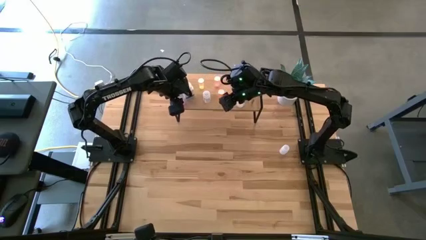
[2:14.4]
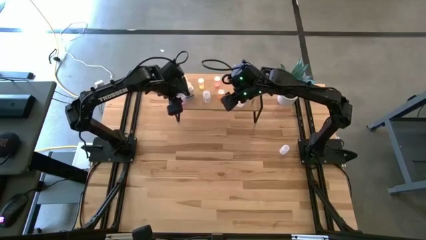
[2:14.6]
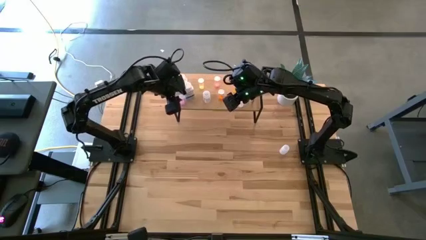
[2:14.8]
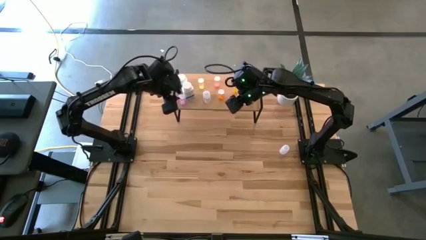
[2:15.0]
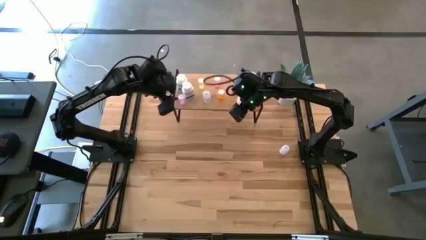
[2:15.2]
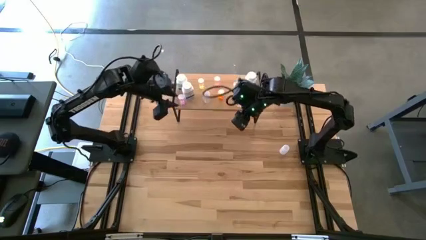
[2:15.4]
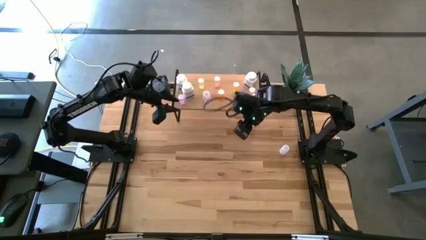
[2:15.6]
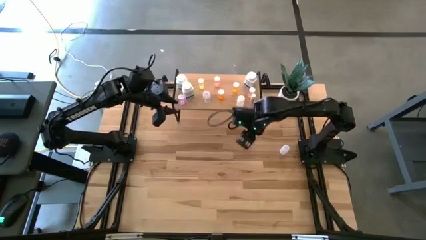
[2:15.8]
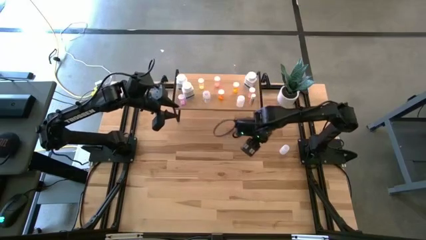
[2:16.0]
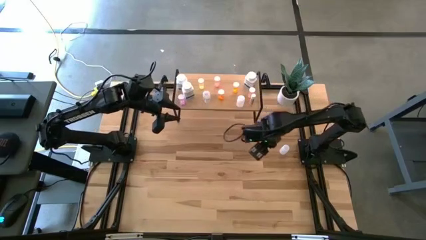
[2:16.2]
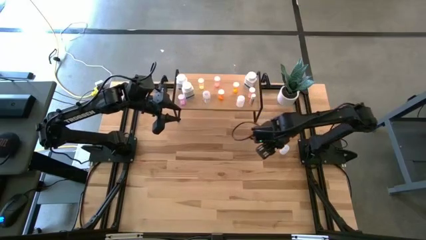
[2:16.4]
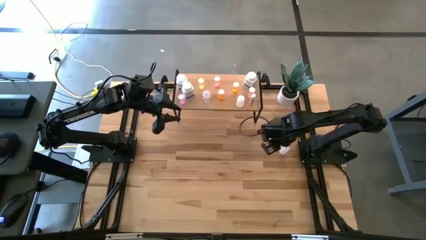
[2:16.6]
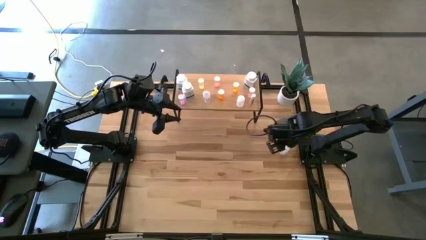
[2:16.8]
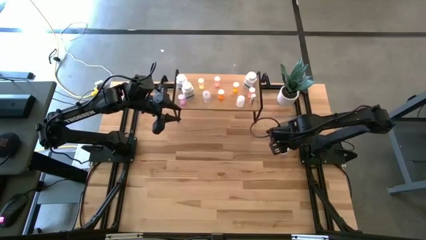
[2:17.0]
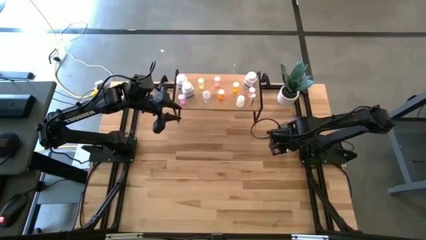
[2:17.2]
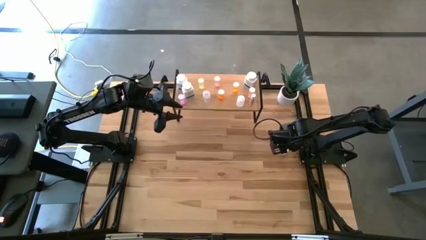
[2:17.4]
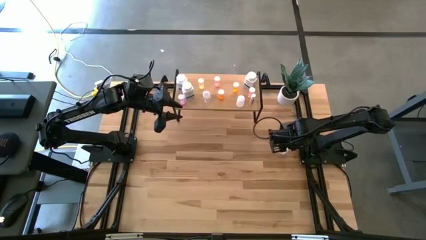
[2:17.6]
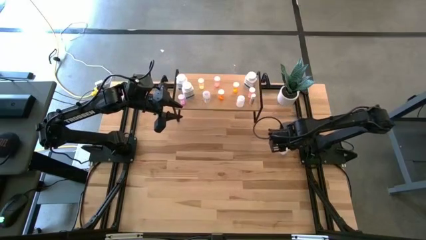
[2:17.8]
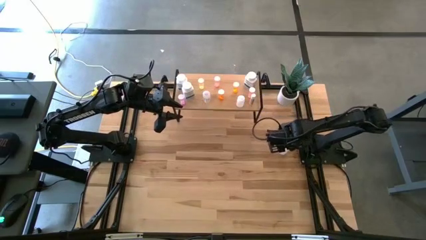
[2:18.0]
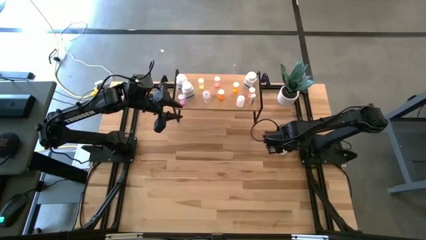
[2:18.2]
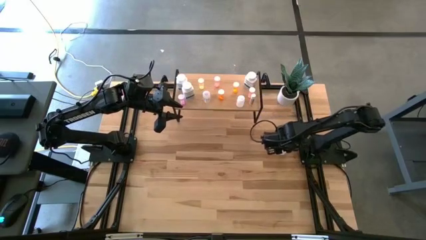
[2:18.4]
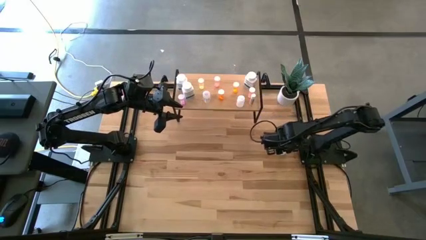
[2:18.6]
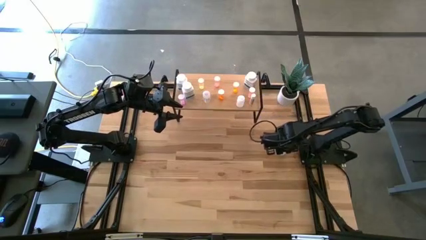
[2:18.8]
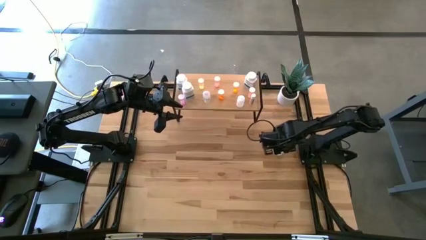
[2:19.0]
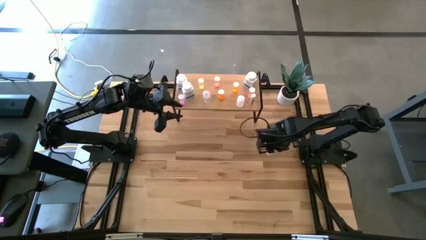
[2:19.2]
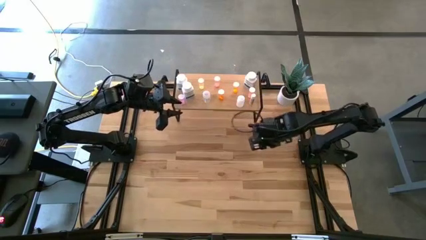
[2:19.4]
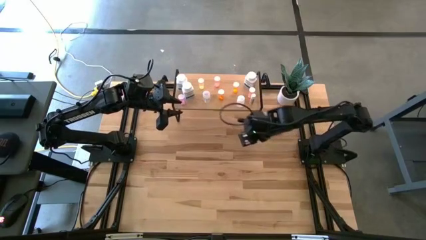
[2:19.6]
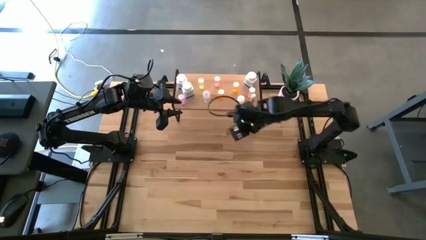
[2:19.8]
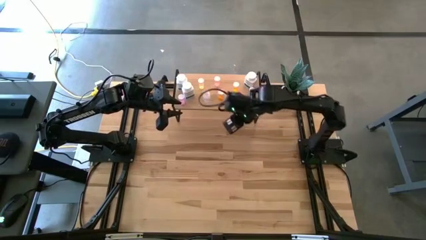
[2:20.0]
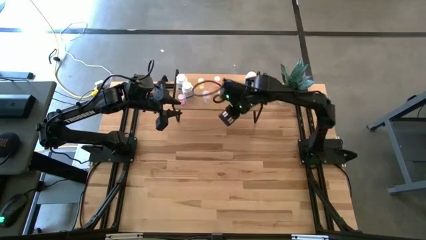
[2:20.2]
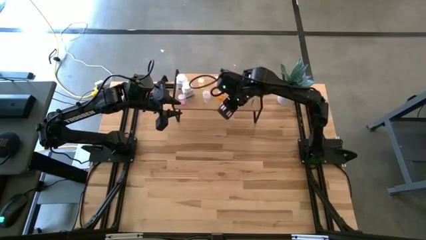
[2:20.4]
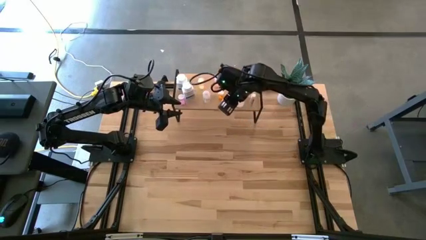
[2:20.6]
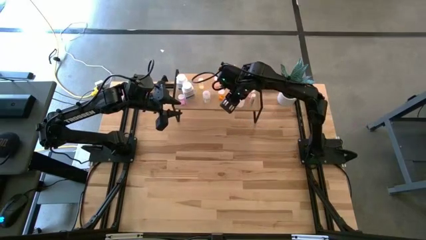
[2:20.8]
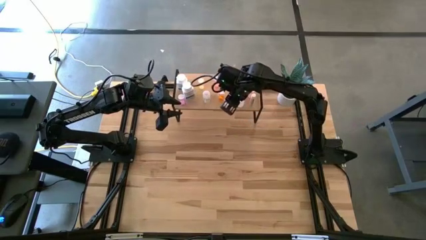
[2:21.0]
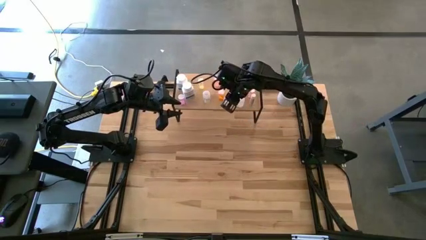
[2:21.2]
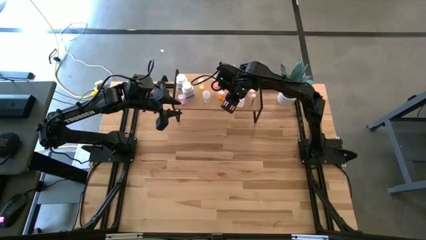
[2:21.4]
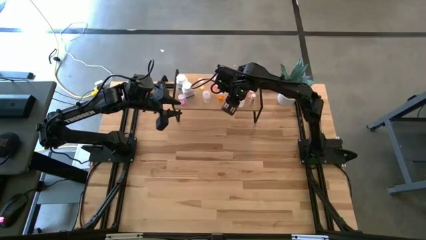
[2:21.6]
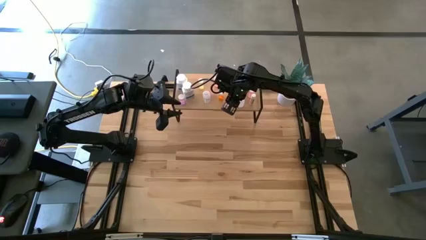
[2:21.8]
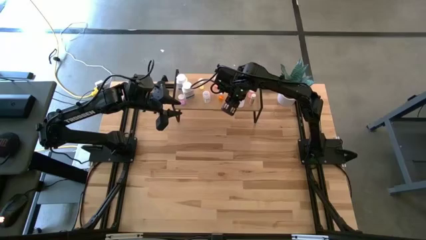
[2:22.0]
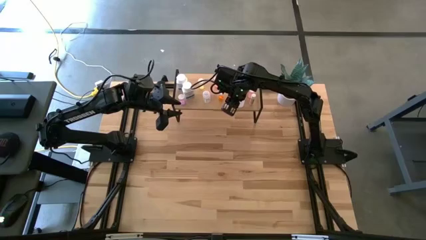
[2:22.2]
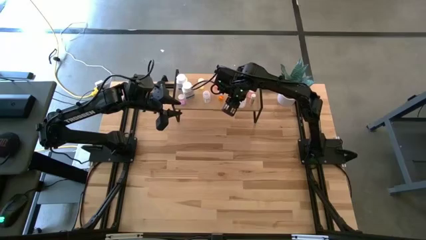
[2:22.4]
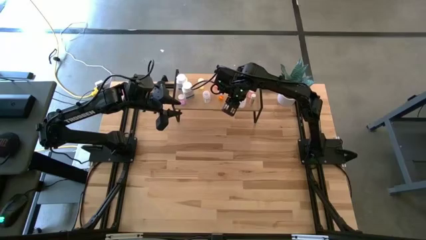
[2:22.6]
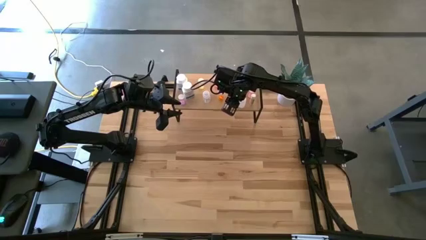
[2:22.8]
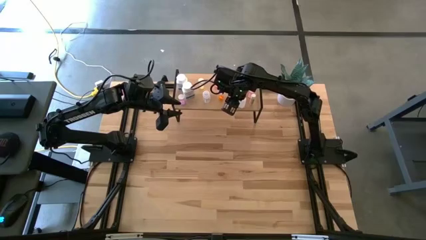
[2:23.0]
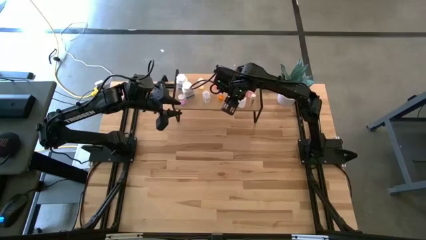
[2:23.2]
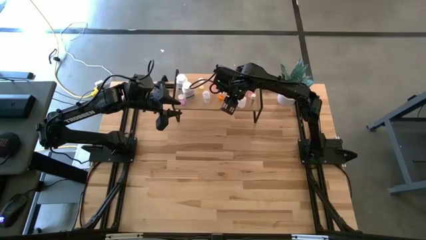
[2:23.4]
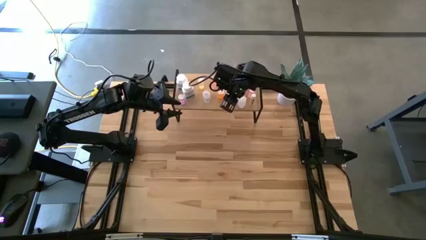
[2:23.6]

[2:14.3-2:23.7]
Task: Pick and place medicine bottles onto shelf by color
Put the white pill bottle on the shelf

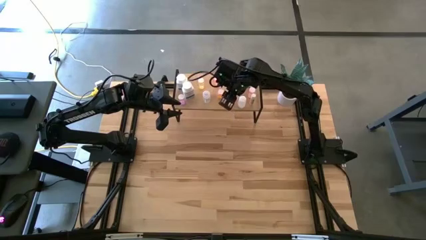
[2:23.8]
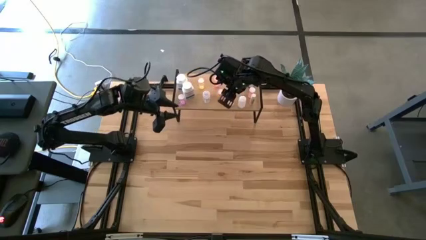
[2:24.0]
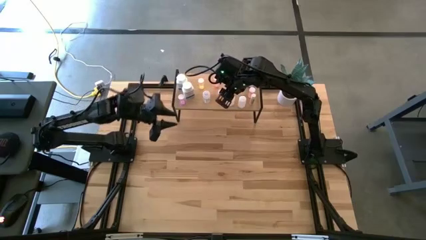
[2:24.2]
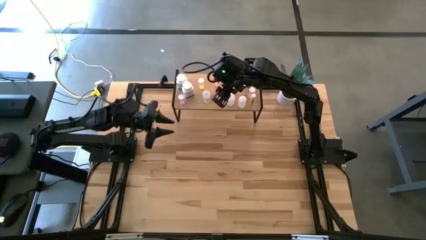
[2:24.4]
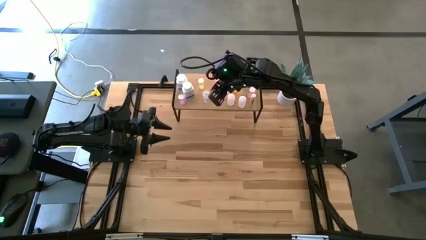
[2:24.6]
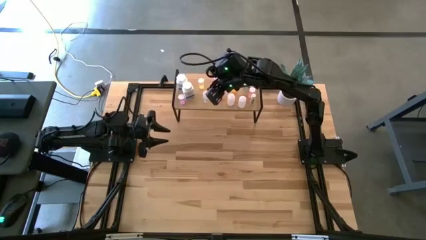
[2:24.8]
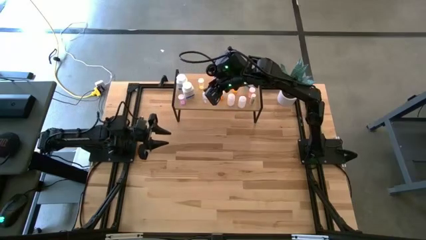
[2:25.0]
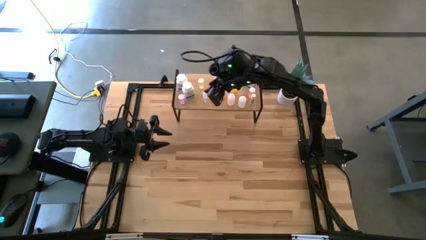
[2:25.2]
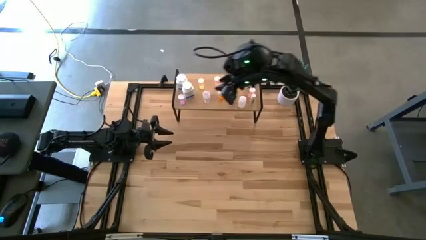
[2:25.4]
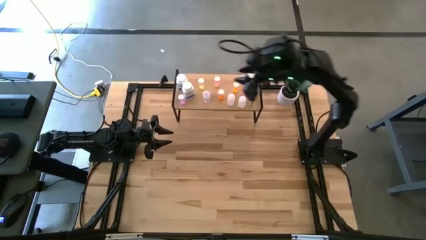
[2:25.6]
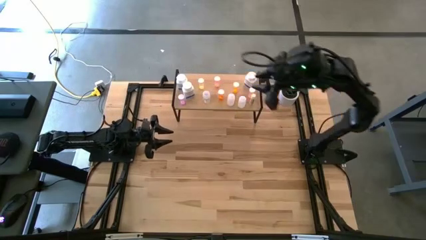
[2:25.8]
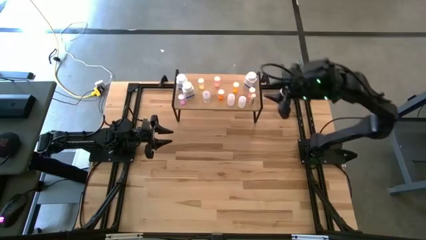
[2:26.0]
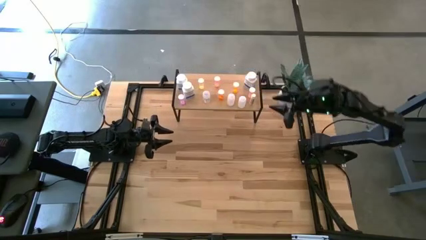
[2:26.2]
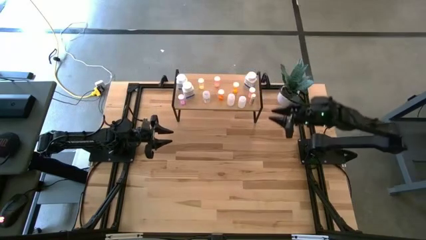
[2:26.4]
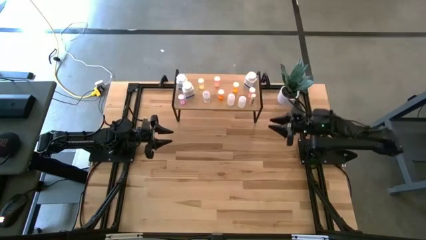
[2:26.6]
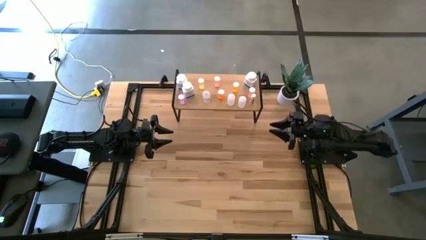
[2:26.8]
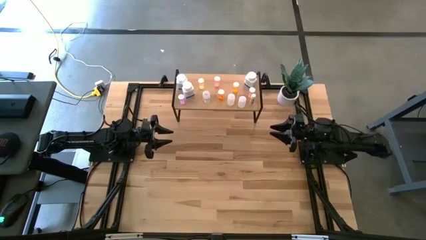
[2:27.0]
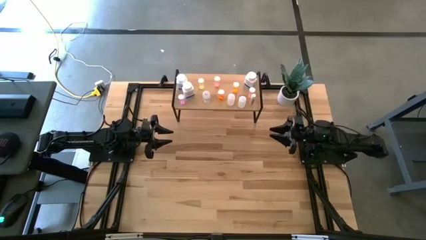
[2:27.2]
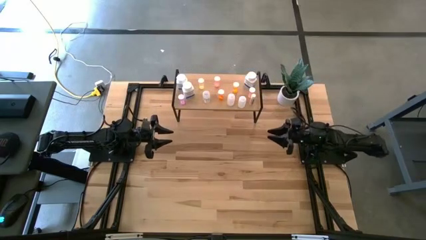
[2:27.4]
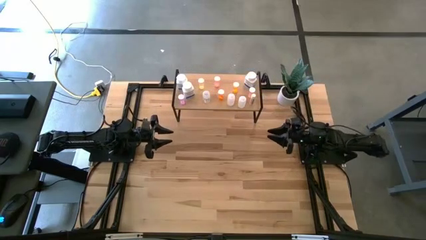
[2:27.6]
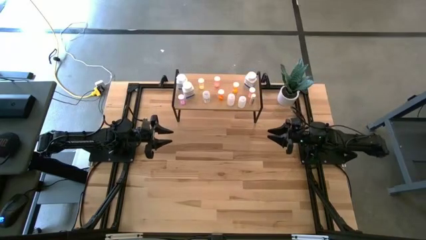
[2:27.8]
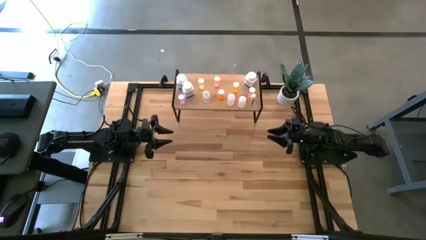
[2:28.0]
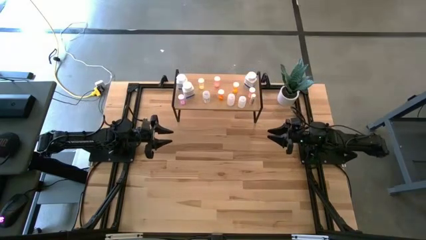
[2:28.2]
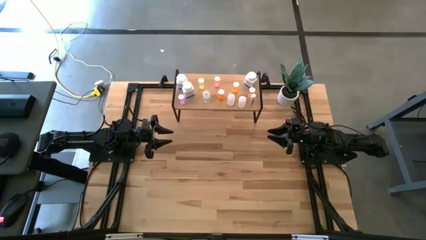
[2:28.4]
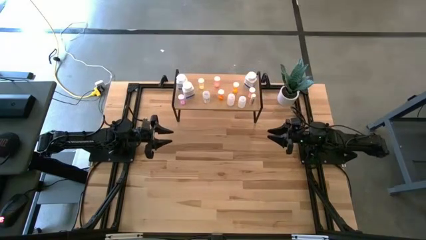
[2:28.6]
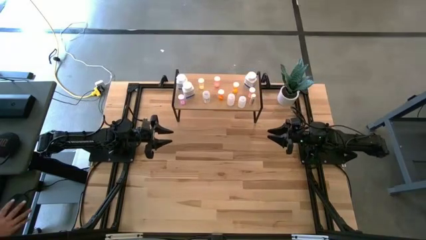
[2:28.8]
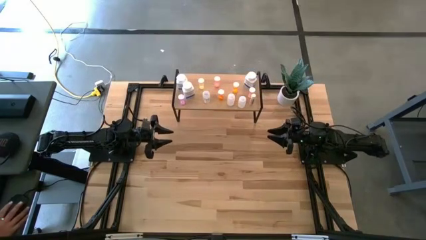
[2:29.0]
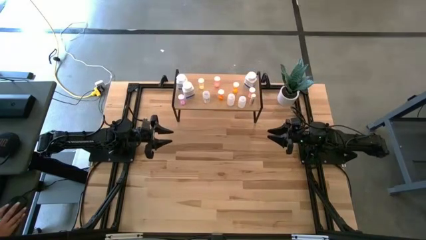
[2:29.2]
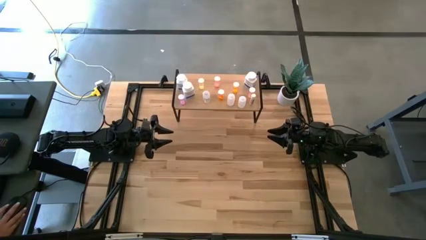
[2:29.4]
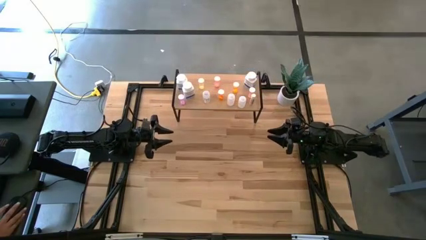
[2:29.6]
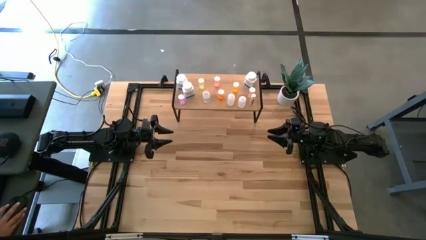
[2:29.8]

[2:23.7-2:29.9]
Return to Home Position

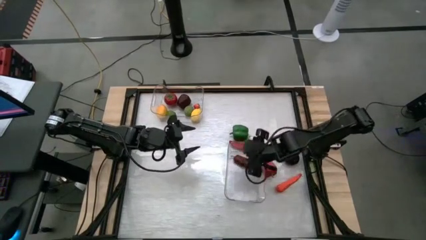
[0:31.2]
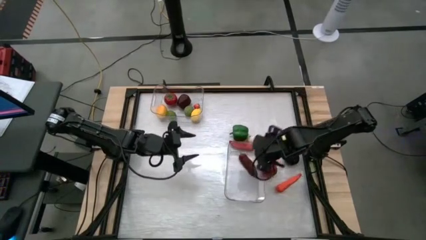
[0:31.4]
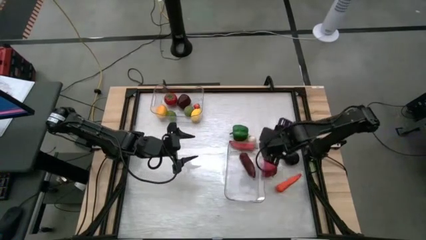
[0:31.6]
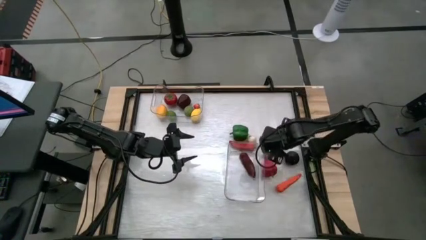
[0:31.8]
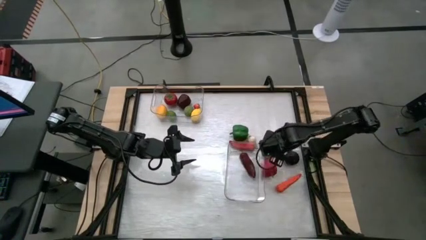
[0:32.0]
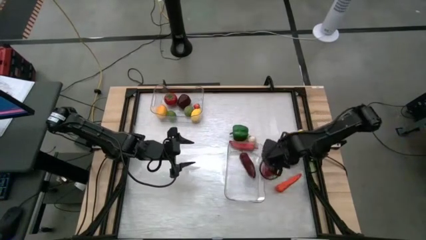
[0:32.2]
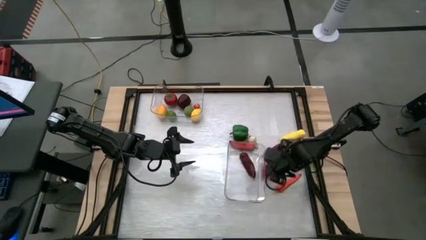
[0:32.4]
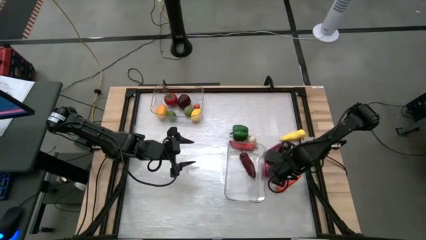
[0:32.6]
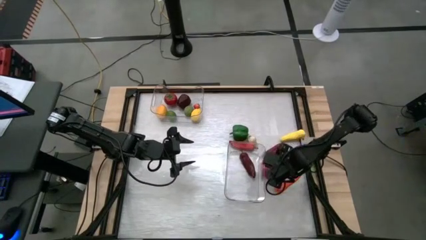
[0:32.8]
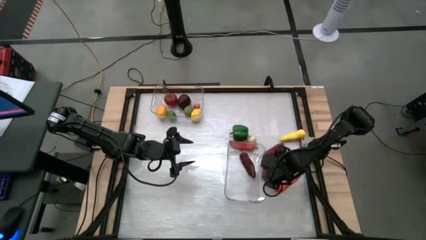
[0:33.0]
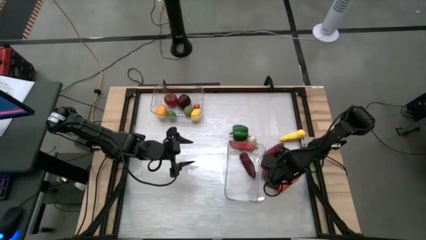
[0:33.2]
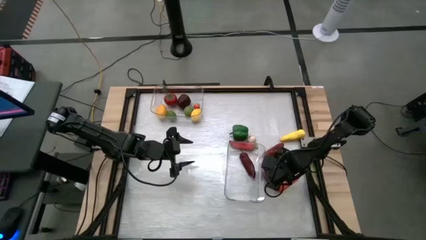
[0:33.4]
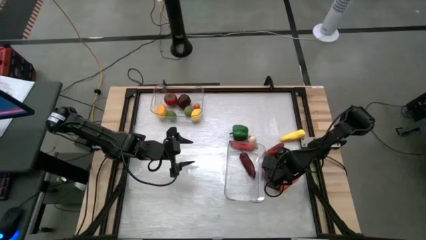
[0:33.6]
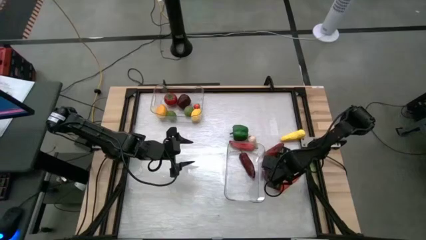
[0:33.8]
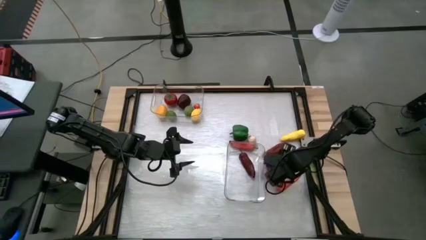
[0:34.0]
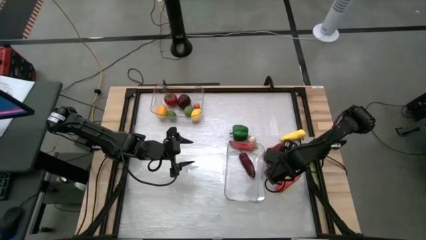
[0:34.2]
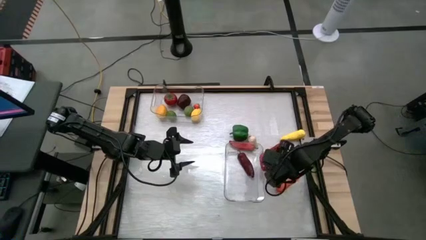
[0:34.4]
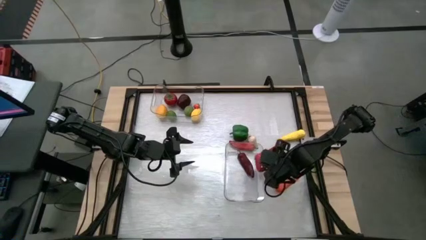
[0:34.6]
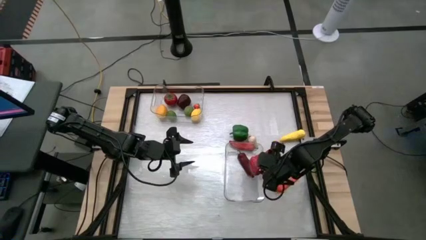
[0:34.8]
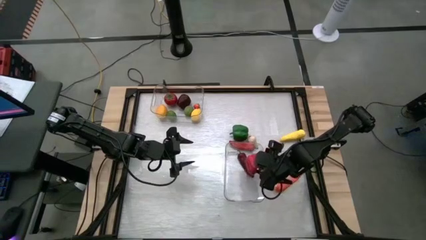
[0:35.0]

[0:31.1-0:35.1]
Task: Sort produce into baskets
Put the red bell pepper into the bottom transparent bin
